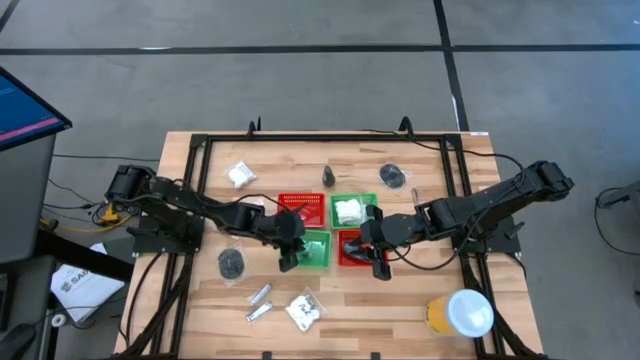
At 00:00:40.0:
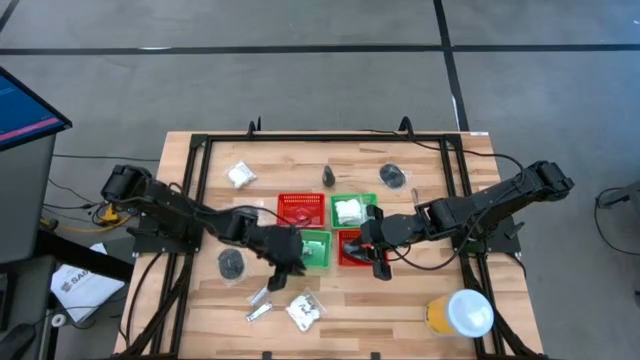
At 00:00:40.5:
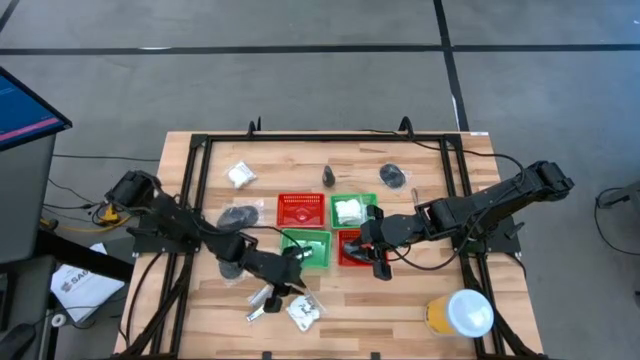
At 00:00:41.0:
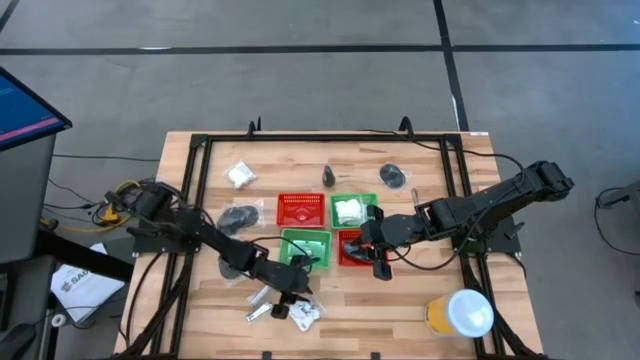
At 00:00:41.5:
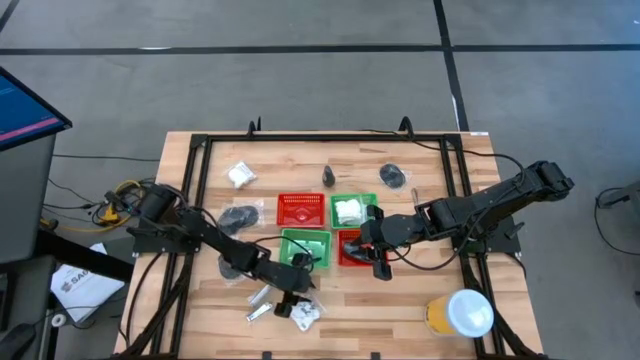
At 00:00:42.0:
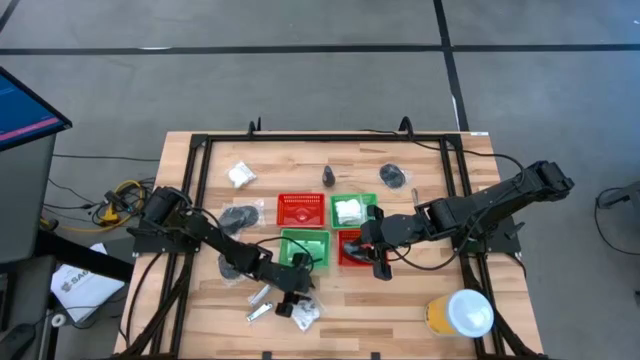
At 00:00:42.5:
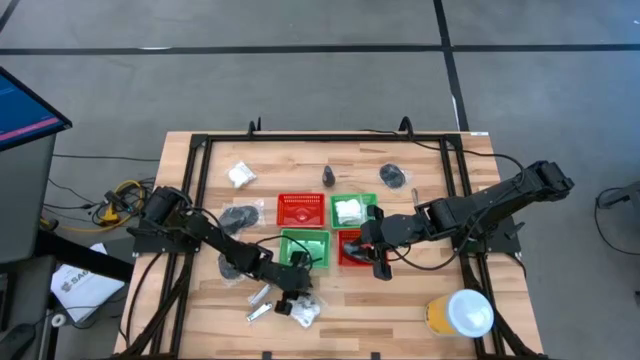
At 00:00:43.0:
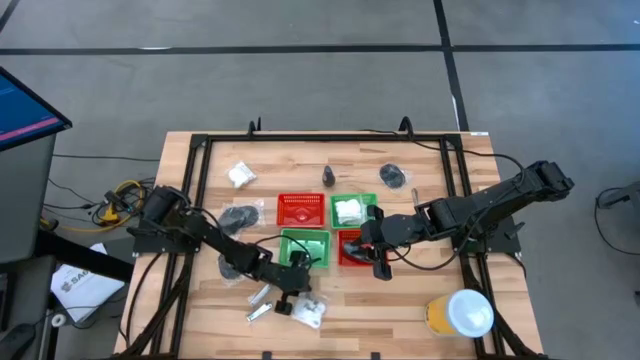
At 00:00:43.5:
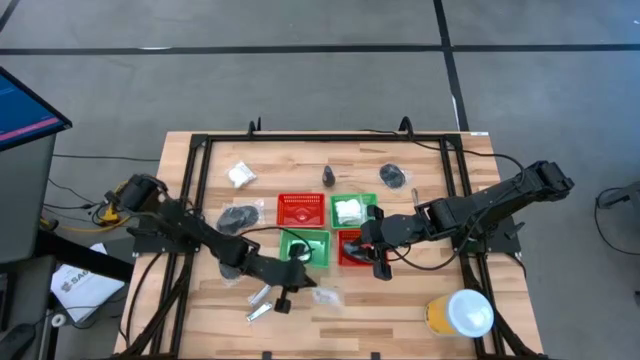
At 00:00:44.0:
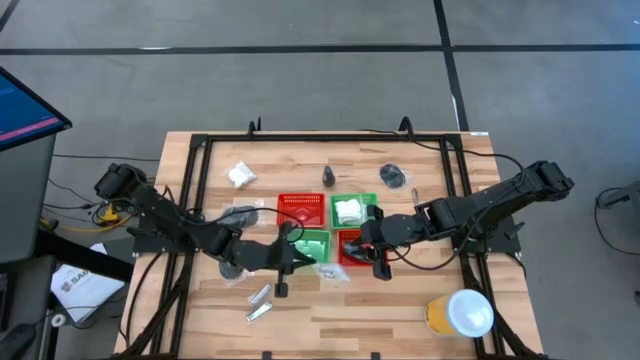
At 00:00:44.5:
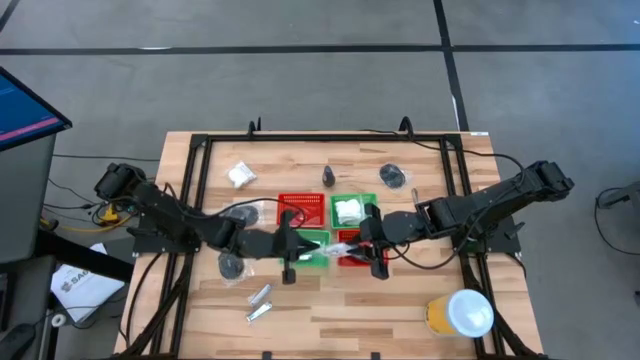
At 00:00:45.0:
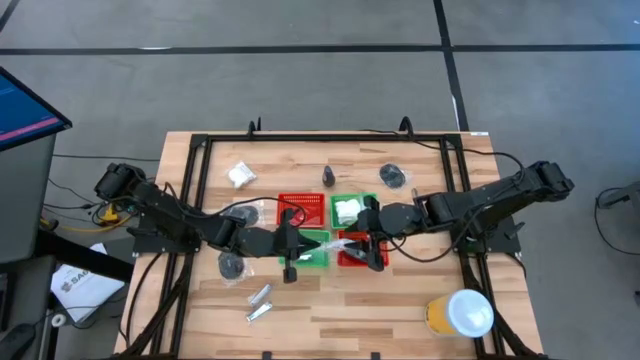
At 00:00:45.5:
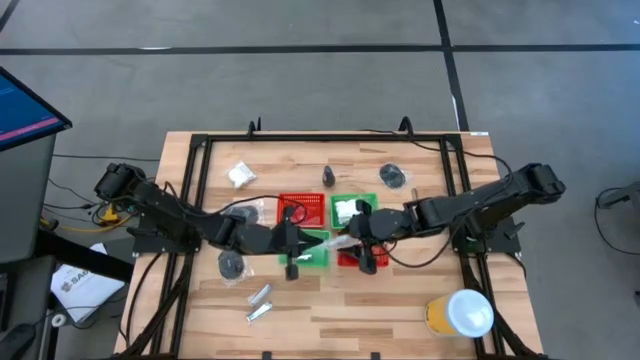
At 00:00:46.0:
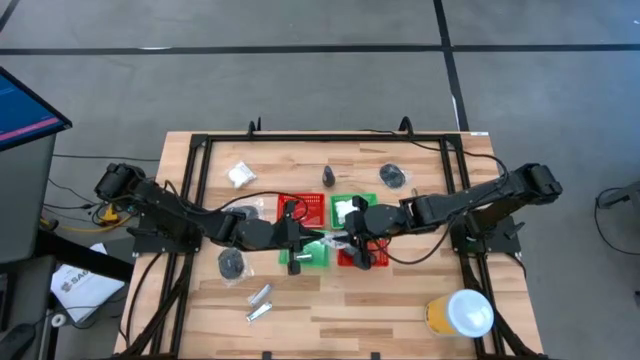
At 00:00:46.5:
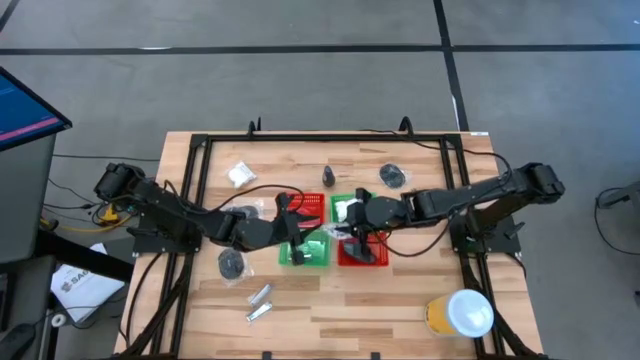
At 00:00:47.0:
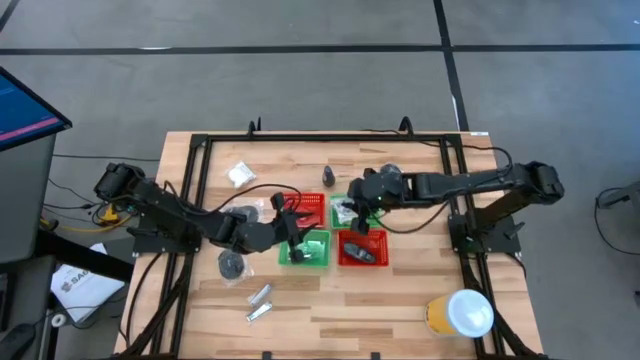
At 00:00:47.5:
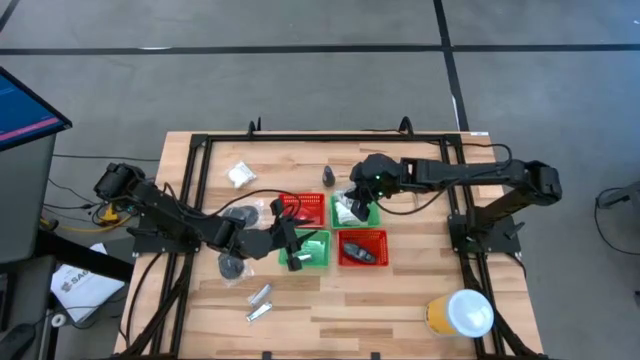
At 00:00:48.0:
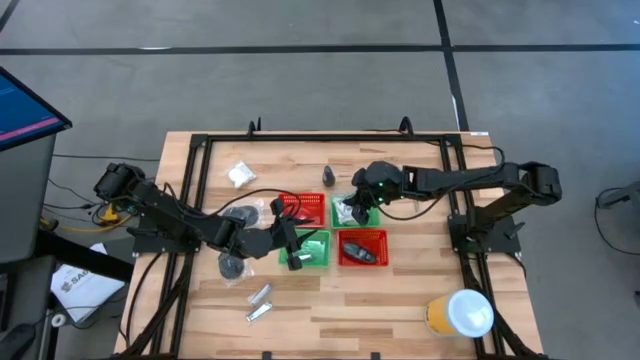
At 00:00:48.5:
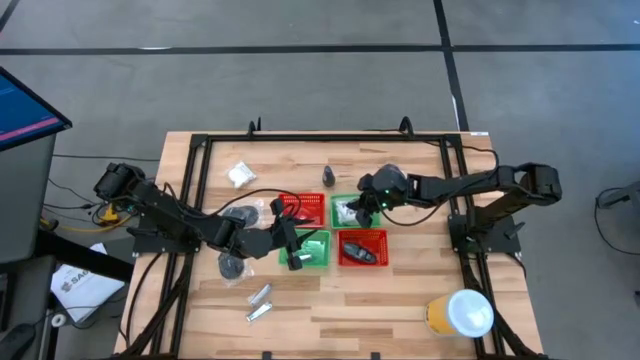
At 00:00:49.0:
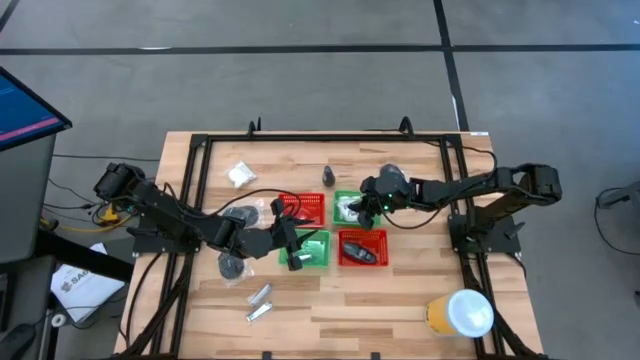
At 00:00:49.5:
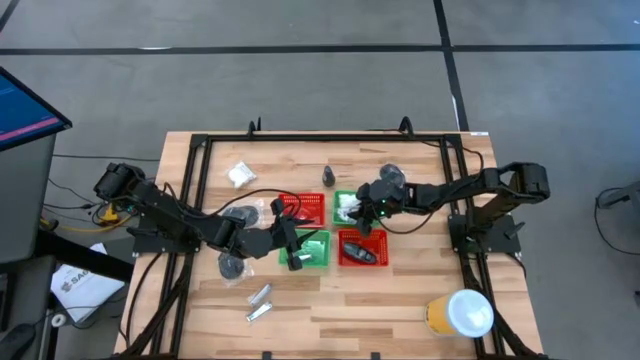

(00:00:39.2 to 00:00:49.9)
Task: Pick & Place Travel size toiletries
Put the white cotton pack into the right green basket

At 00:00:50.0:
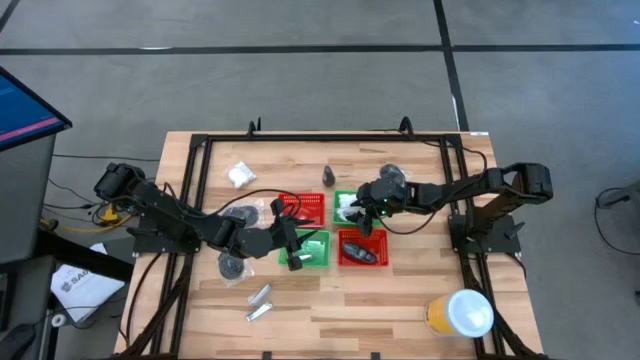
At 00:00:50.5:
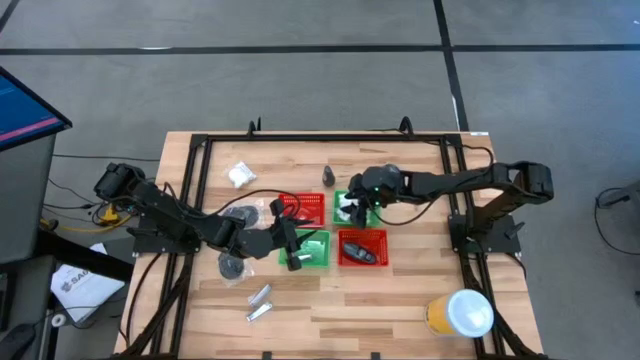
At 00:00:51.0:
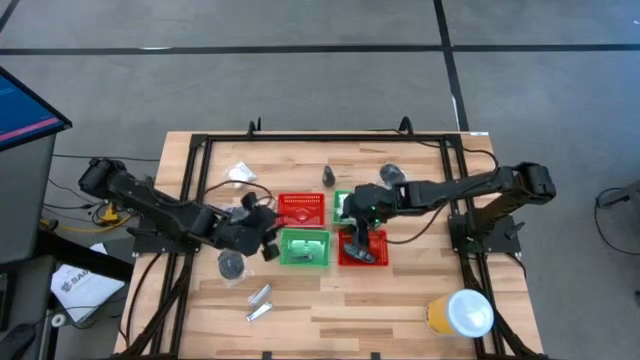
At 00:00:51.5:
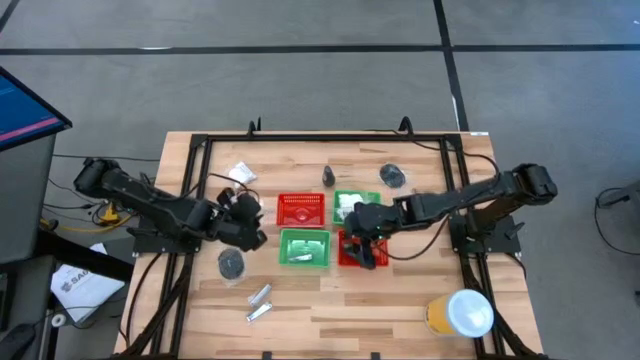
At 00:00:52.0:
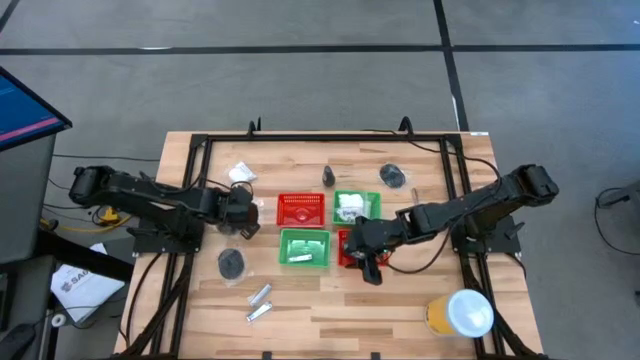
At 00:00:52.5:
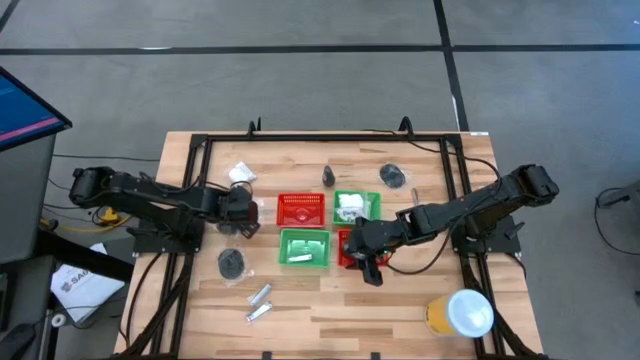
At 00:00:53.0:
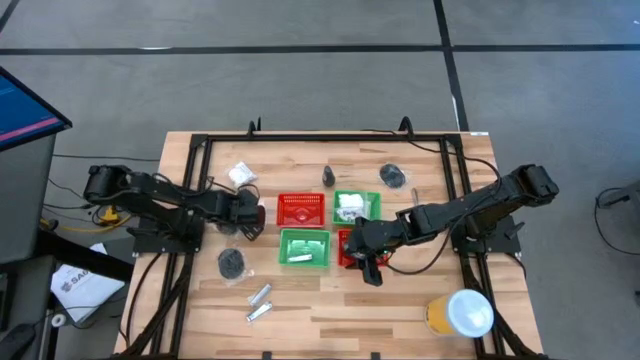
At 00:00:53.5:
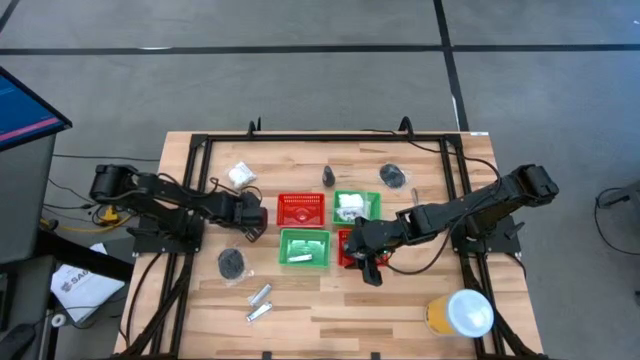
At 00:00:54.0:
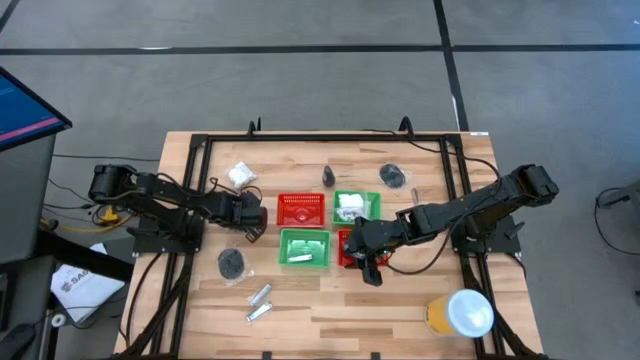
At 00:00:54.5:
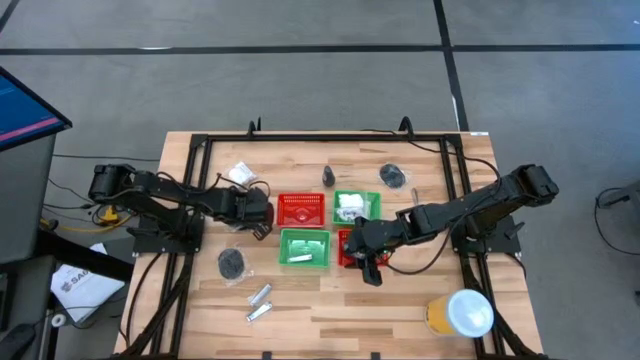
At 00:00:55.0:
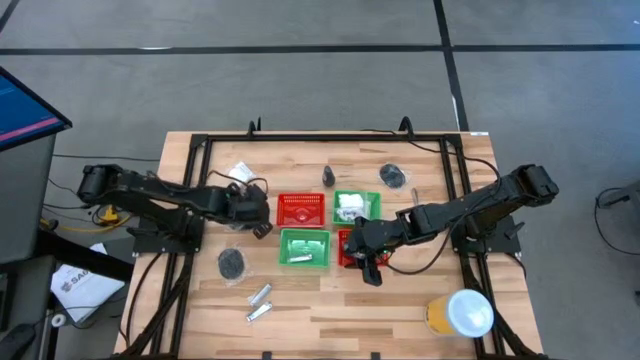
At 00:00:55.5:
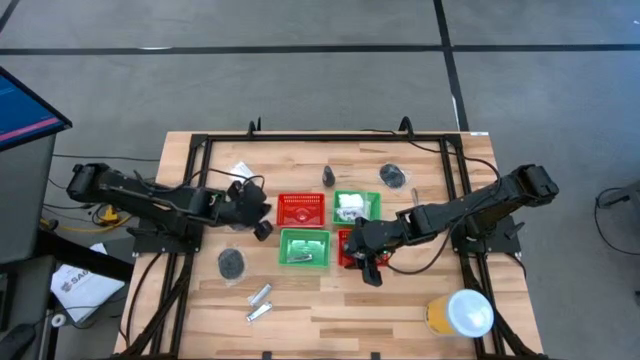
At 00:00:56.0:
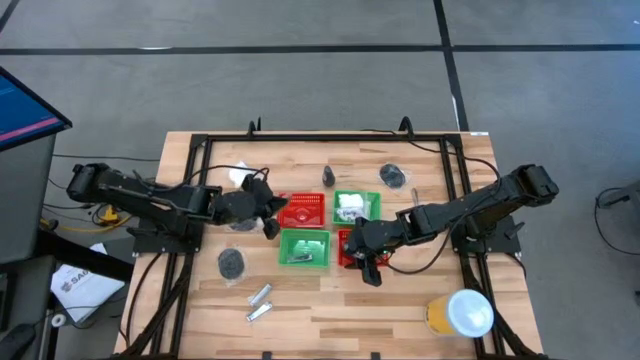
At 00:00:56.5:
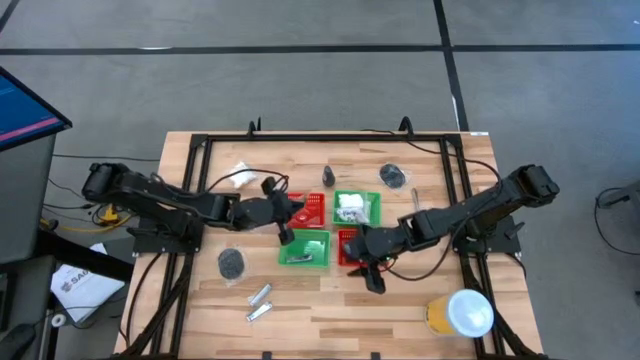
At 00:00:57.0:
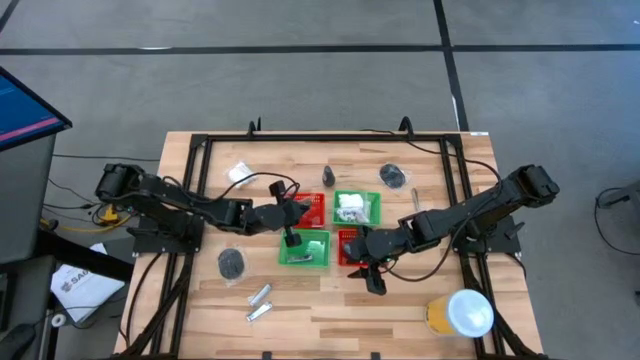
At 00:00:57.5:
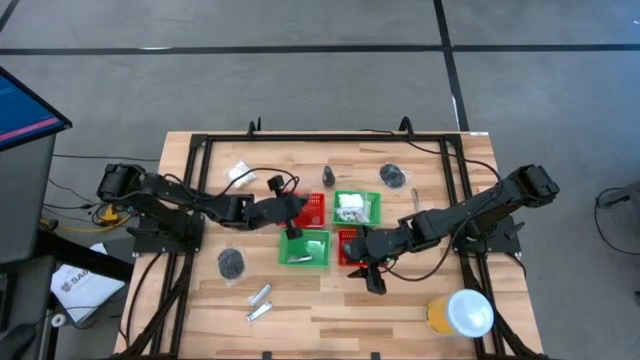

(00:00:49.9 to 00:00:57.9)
Put the black hairbrush into the left red basket

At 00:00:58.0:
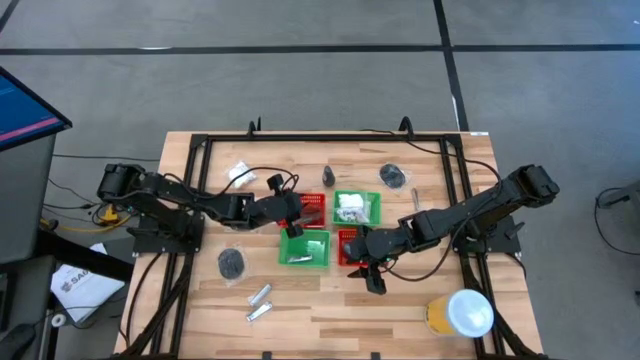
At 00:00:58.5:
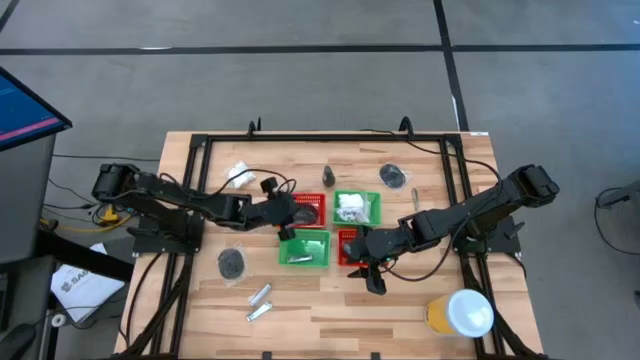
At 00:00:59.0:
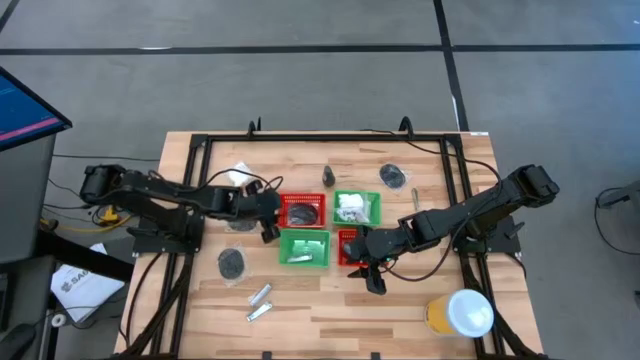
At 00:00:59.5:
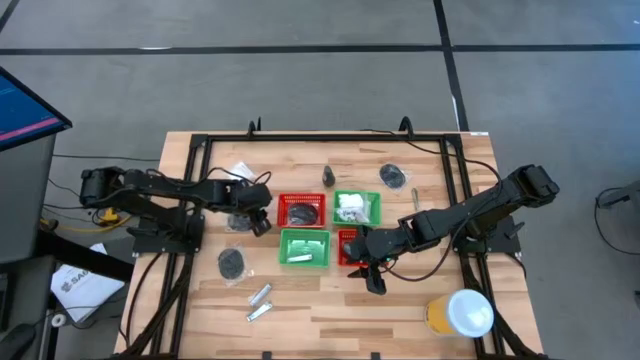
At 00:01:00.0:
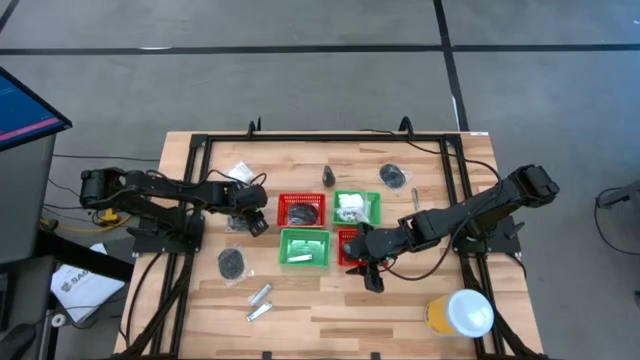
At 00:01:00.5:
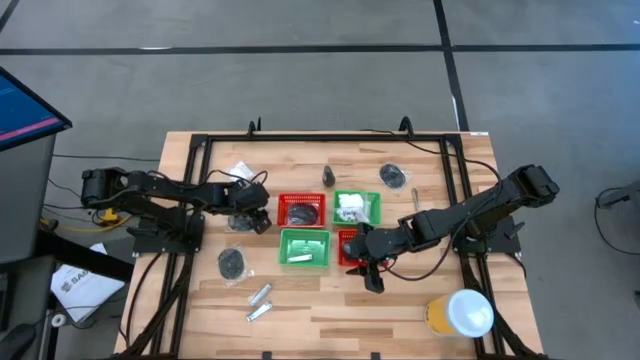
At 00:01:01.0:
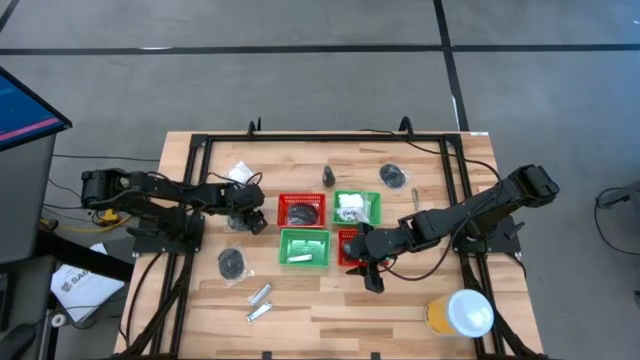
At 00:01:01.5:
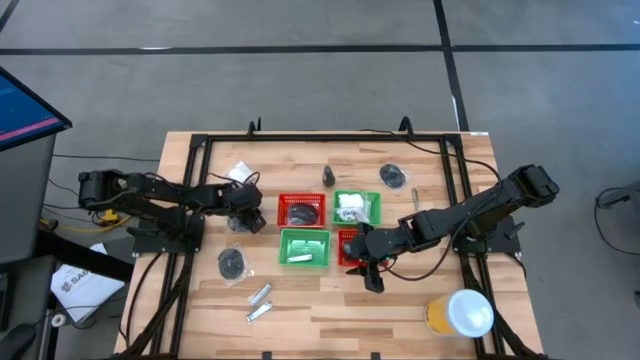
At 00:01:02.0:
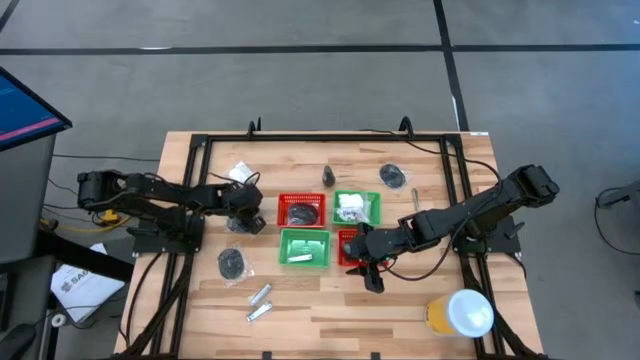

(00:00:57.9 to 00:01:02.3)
Put the black hairbrush into the left red basket
